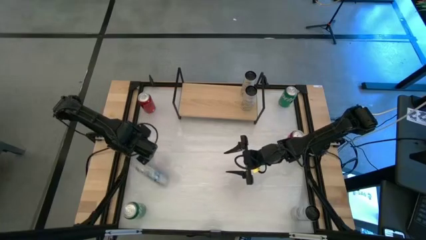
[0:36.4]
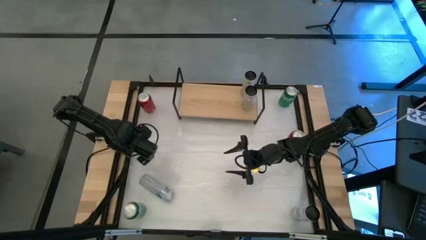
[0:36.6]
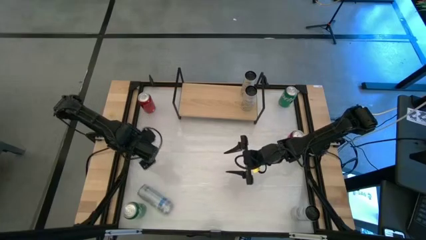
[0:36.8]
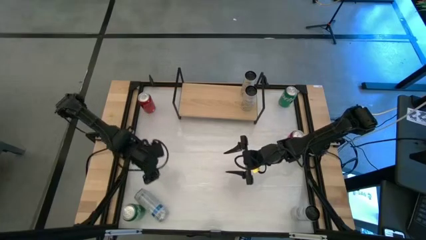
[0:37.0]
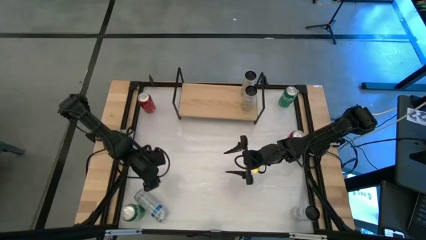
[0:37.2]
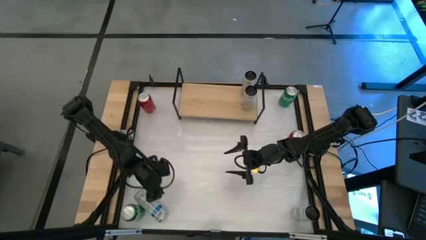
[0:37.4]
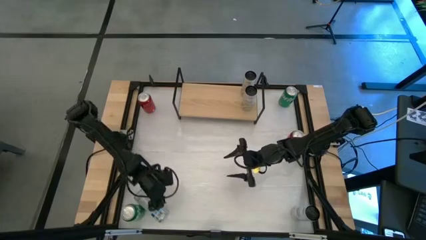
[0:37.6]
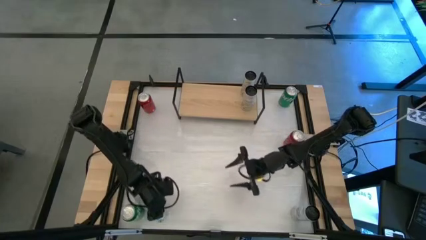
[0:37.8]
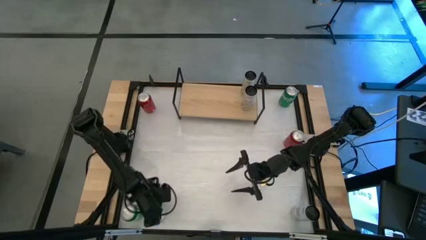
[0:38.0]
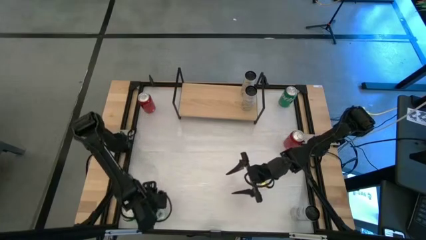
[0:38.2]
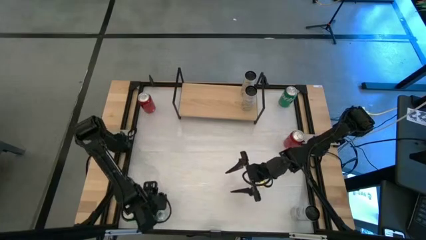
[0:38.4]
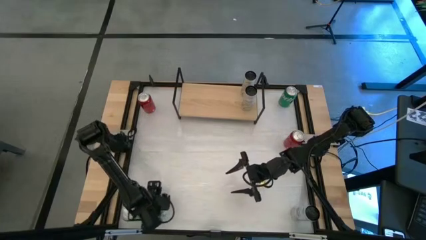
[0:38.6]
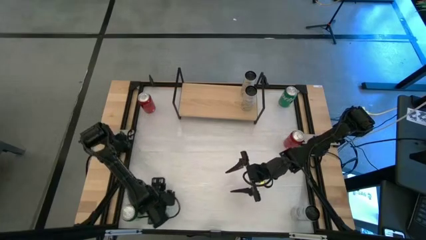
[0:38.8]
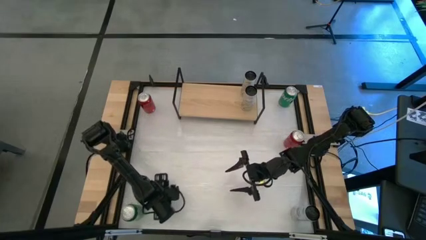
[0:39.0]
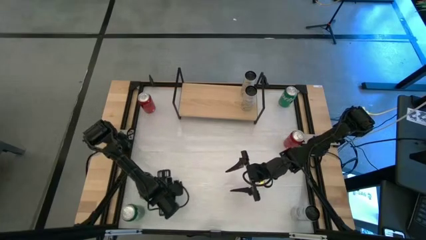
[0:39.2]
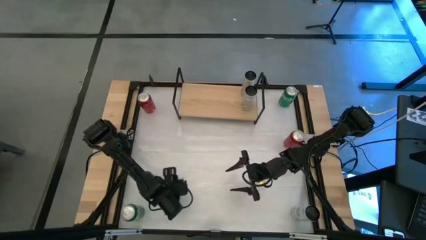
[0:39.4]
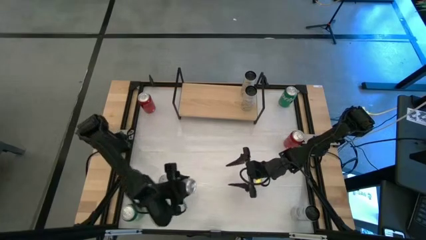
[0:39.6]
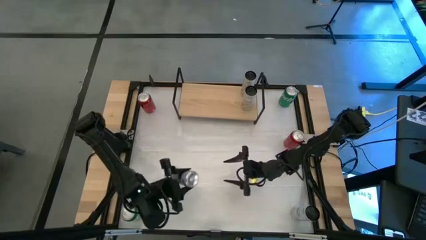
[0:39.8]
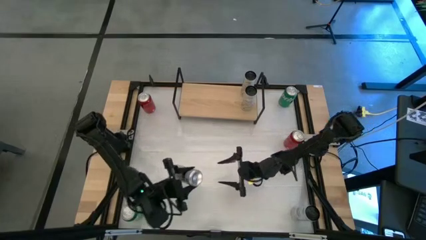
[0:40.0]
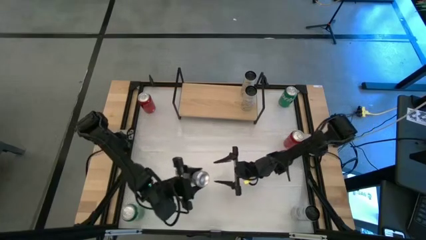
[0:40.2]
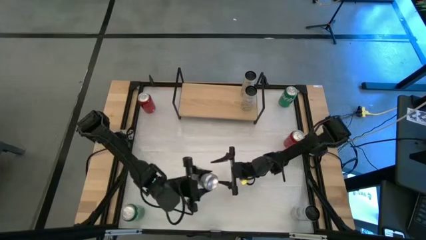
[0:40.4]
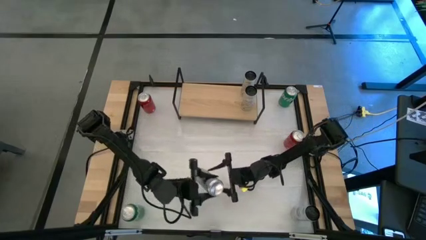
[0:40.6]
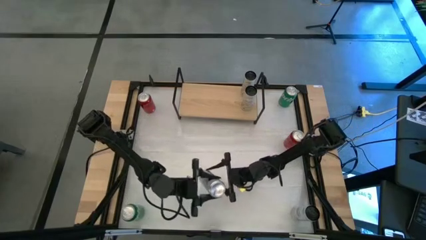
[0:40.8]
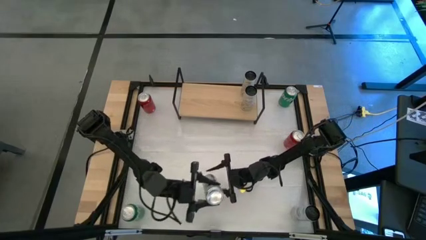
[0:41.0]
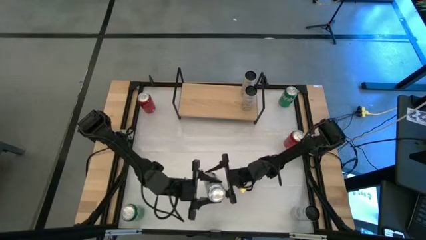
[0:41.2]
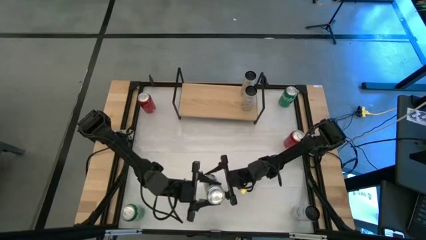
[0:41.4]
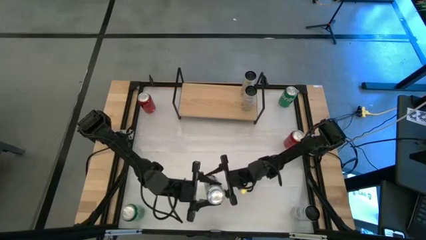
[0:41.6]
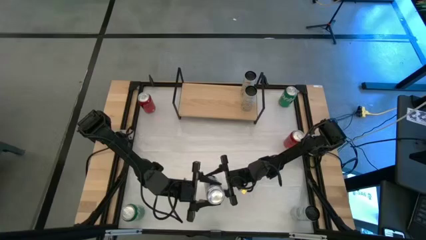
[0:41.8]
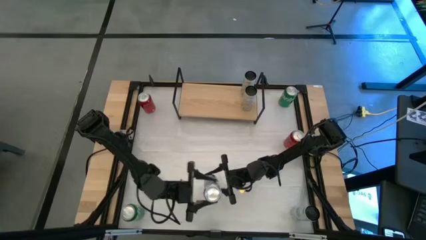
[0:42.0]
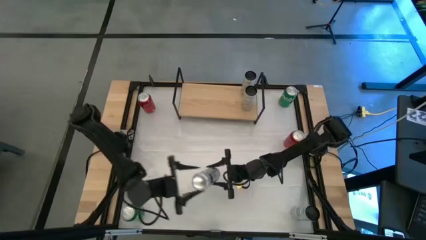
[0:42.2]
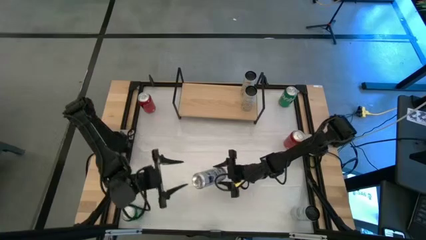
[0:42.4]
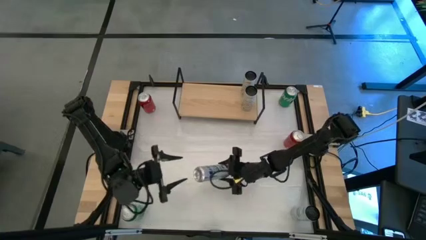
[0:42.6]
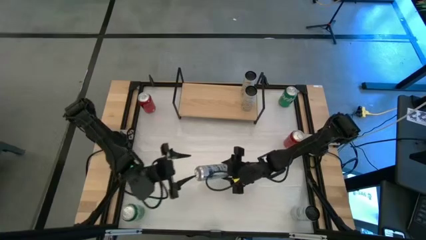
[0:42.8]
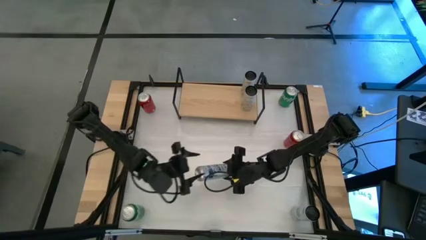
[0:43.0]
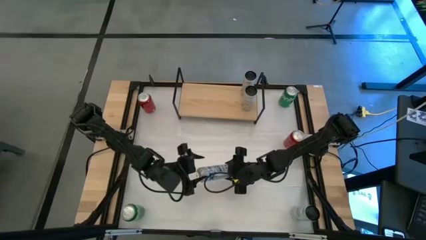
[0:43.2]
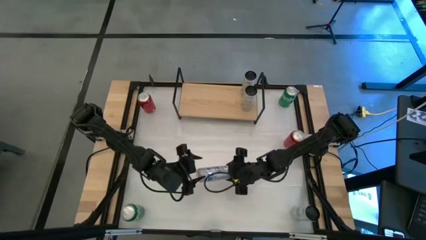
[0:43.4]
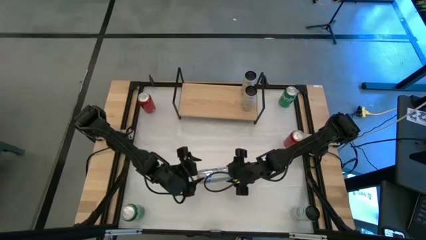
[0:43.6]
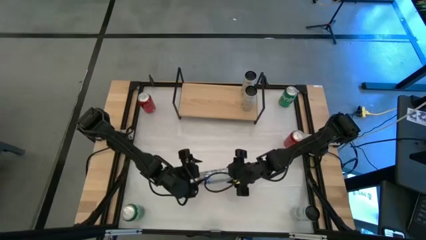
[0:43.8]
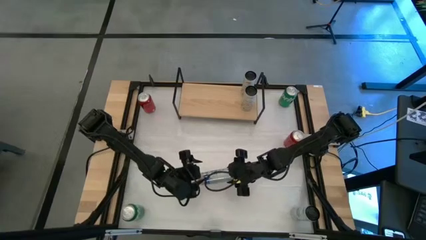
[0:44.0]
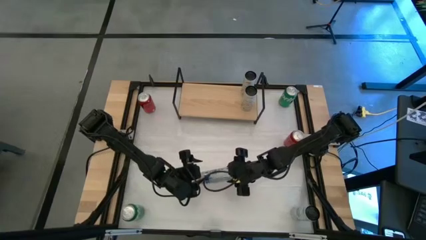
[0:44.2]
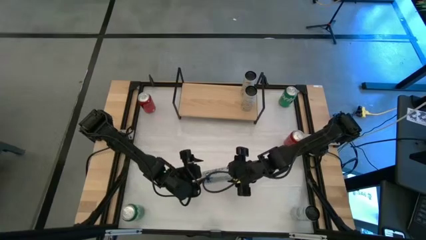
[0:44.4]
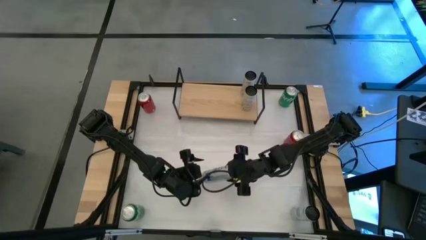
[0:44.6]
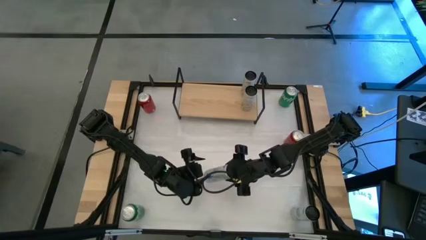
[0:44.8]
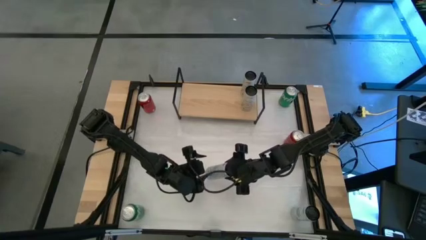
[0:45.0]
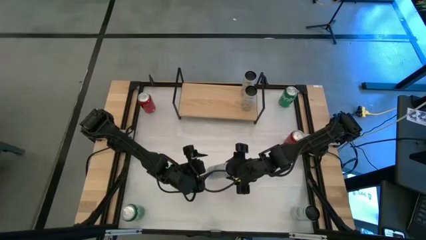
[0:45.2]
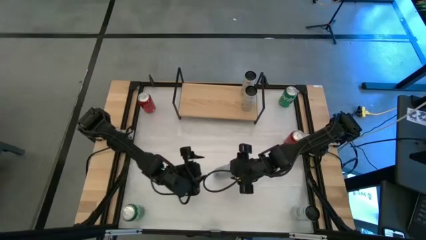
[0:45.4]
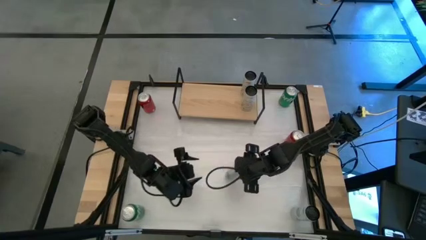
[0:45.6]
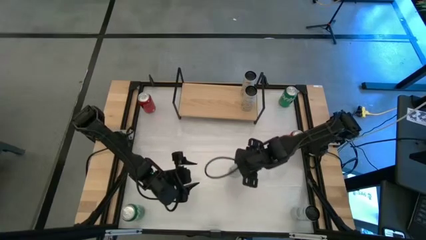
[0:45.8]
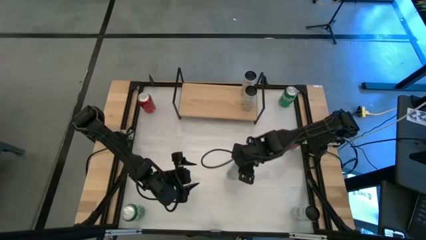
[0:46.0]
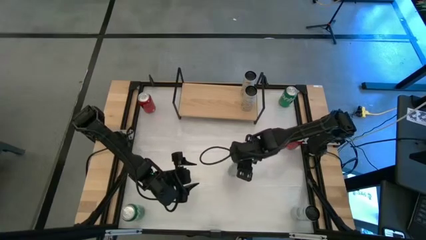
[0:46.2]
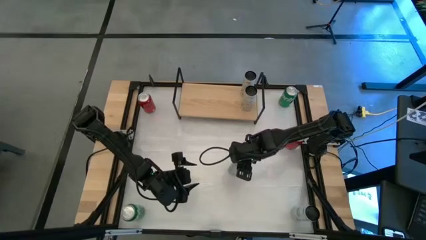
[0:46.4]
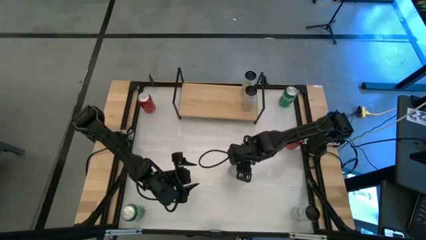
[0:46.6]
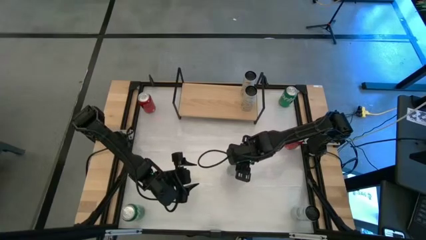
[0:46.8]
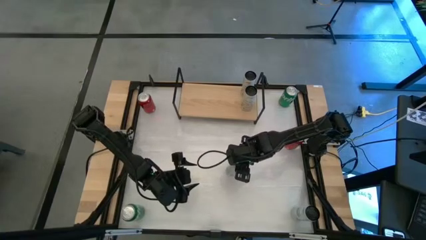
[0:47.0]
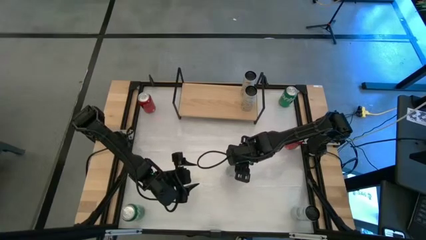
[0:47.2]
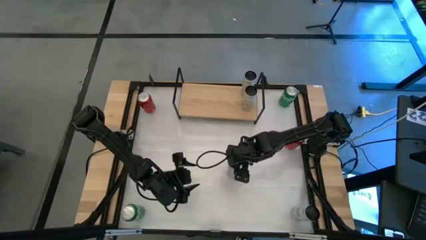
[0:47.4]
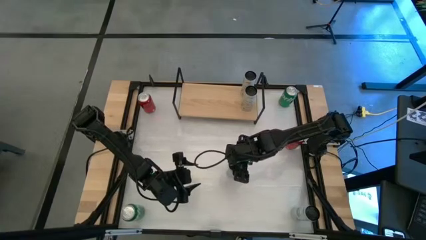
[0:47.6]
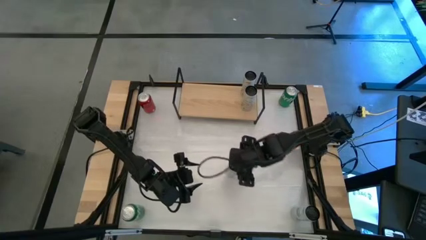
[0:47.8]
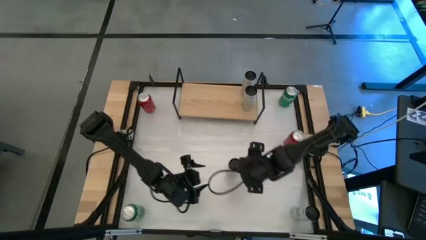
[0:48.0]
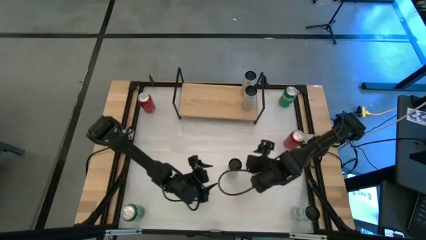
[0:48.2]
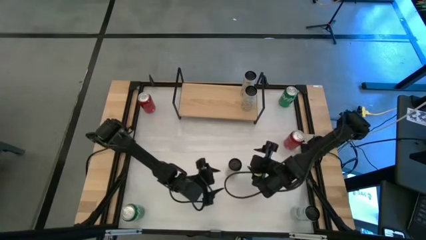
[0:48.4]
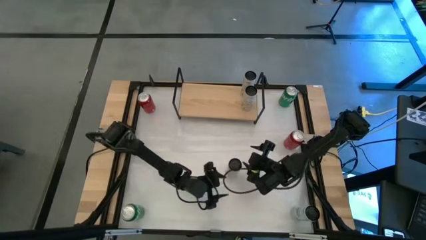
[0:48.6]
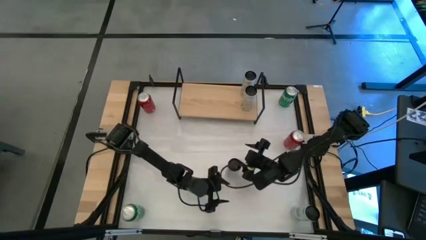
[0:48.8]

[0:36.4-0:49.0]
Task: Place canned beverage on shelf
Put the left white blue soda can on the shelf
